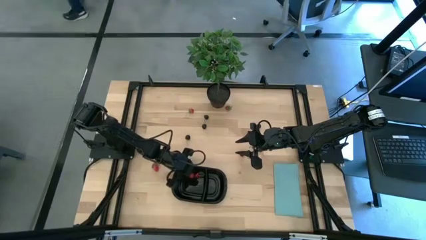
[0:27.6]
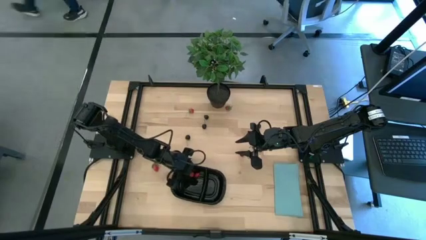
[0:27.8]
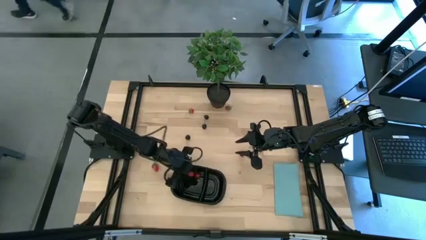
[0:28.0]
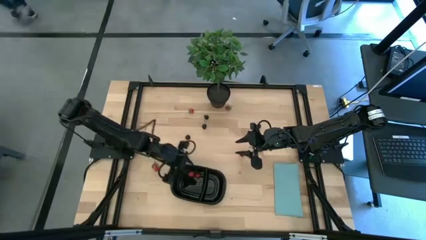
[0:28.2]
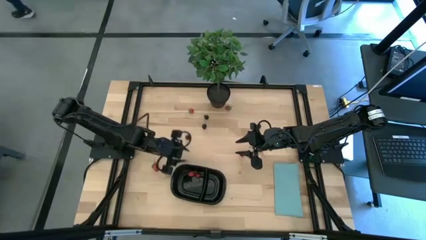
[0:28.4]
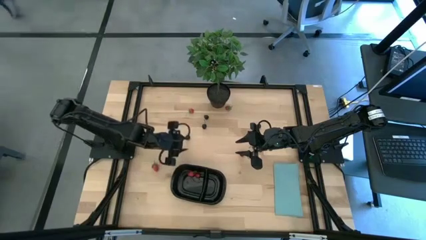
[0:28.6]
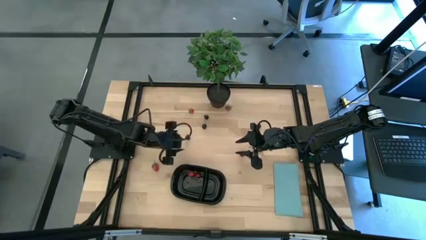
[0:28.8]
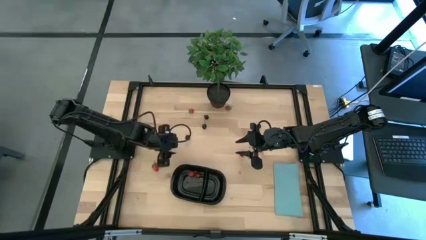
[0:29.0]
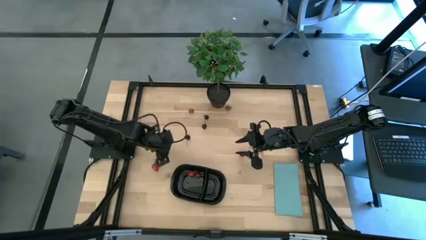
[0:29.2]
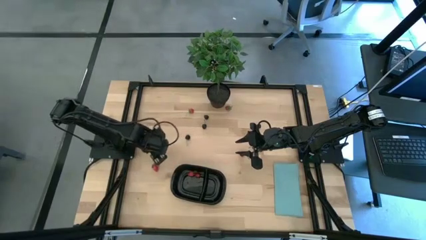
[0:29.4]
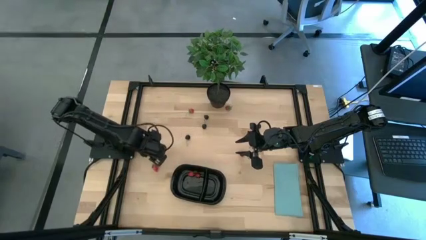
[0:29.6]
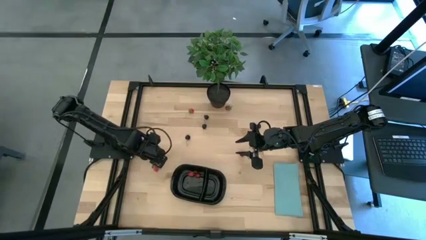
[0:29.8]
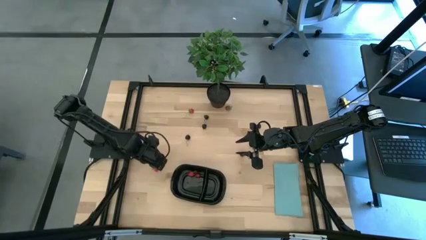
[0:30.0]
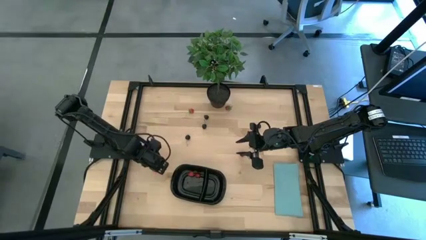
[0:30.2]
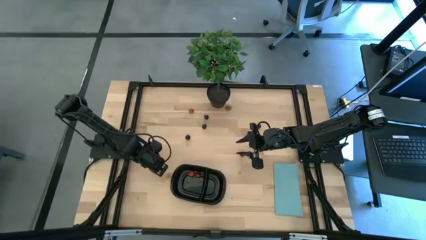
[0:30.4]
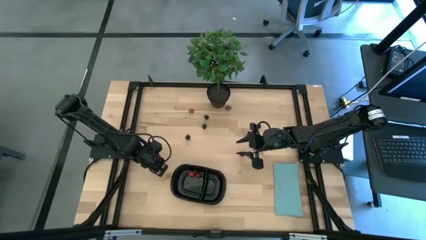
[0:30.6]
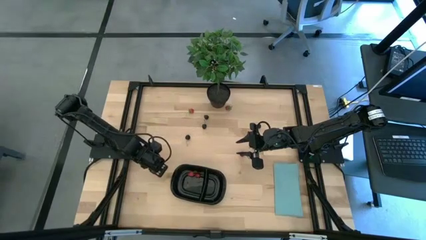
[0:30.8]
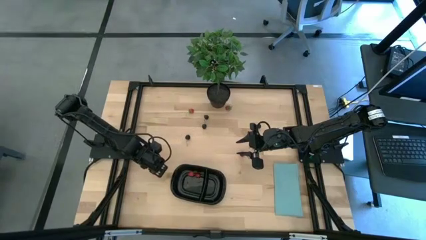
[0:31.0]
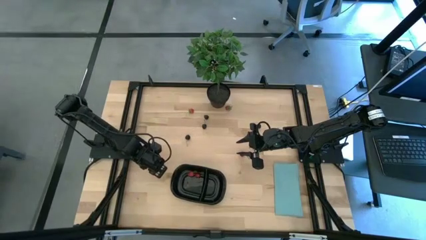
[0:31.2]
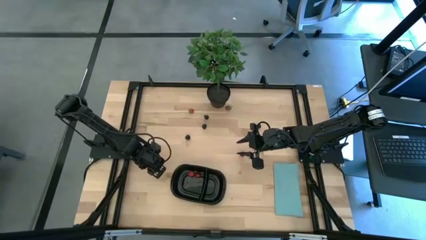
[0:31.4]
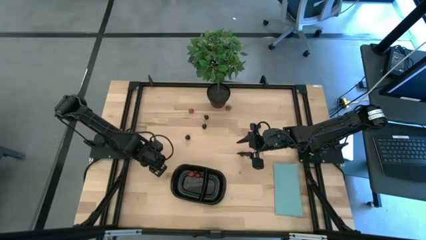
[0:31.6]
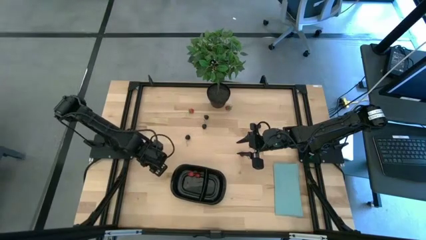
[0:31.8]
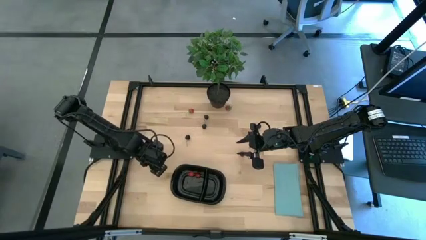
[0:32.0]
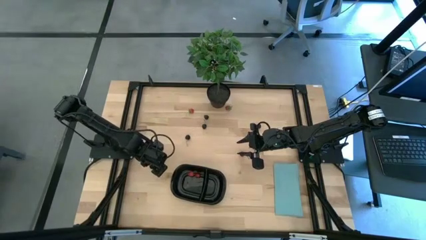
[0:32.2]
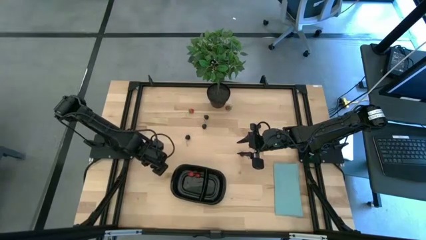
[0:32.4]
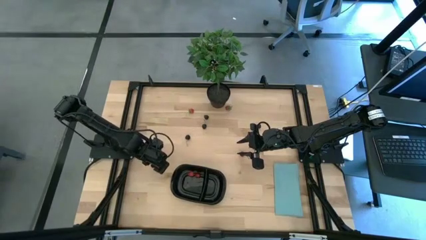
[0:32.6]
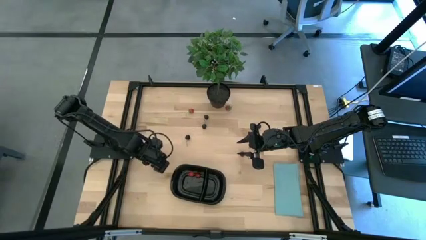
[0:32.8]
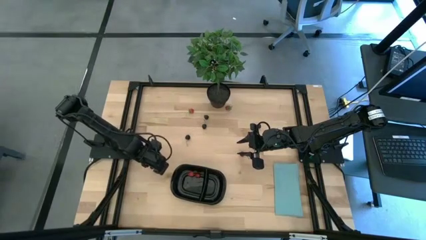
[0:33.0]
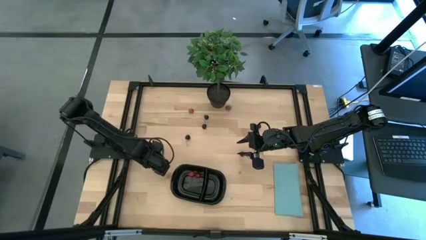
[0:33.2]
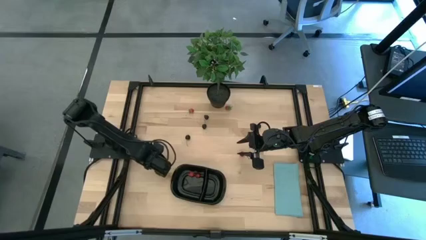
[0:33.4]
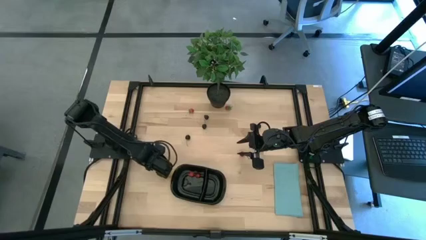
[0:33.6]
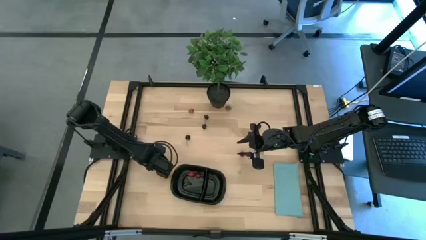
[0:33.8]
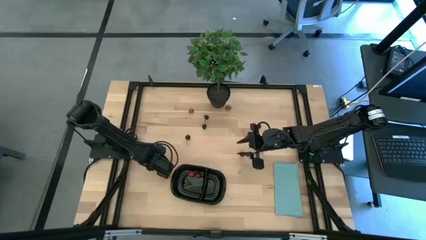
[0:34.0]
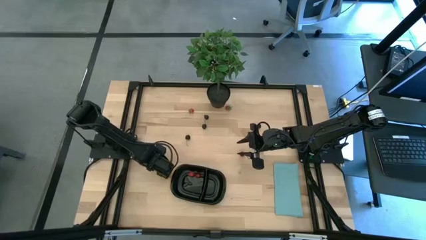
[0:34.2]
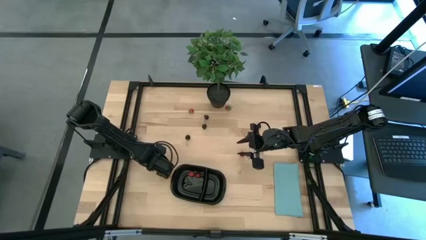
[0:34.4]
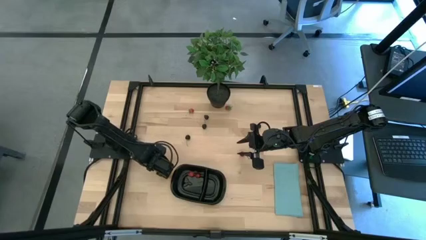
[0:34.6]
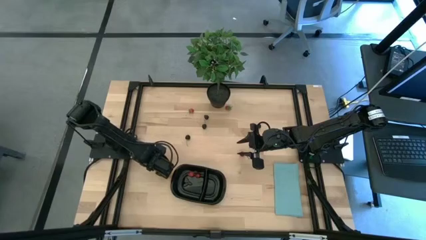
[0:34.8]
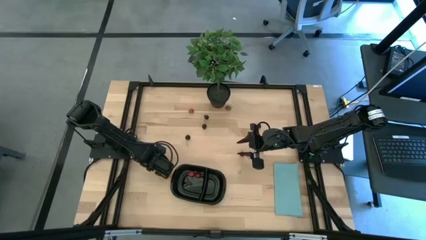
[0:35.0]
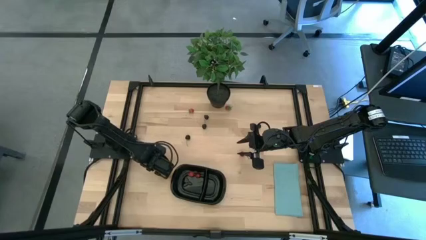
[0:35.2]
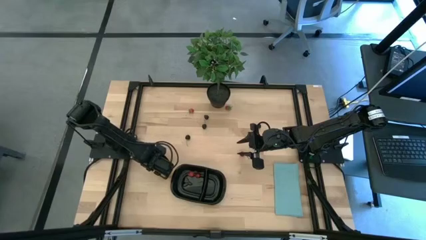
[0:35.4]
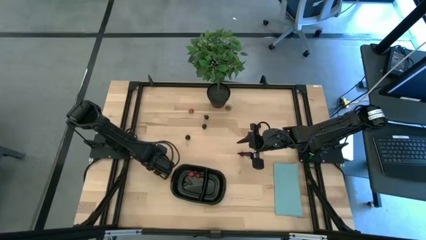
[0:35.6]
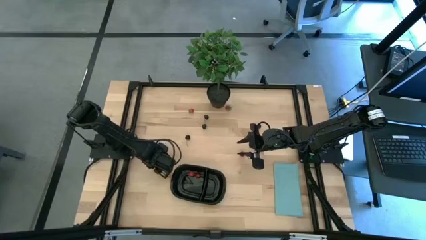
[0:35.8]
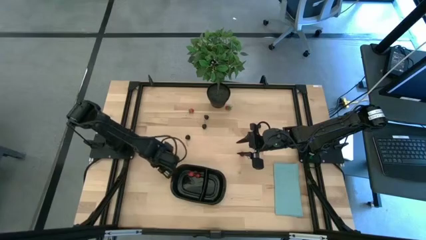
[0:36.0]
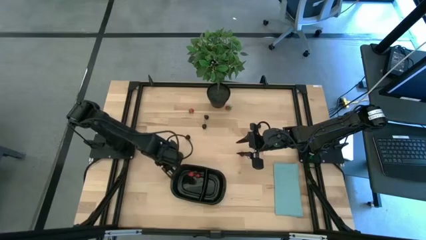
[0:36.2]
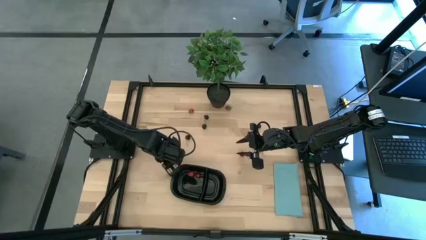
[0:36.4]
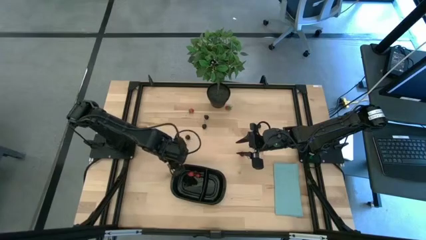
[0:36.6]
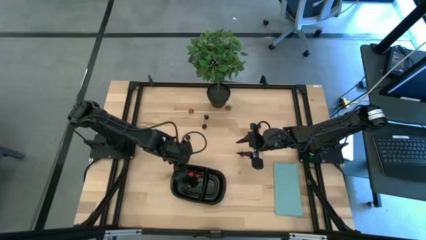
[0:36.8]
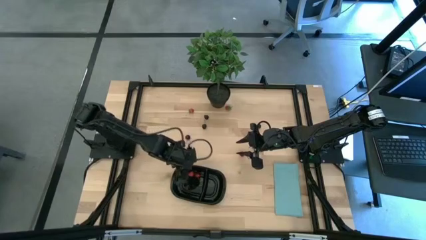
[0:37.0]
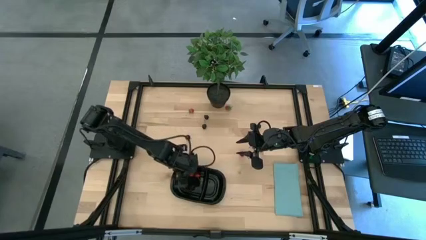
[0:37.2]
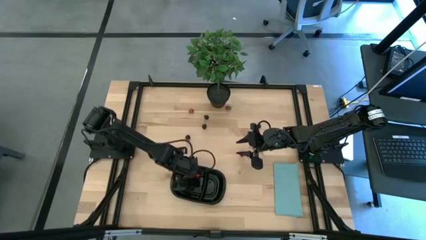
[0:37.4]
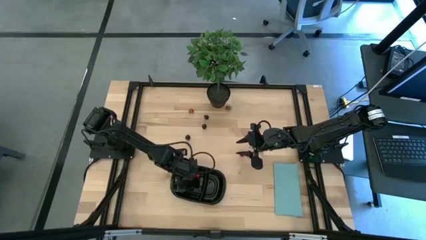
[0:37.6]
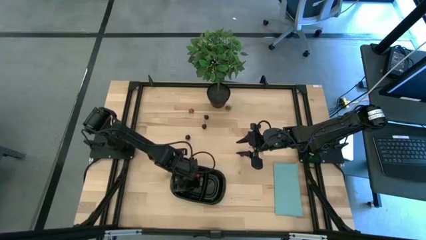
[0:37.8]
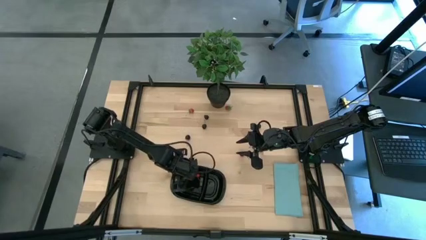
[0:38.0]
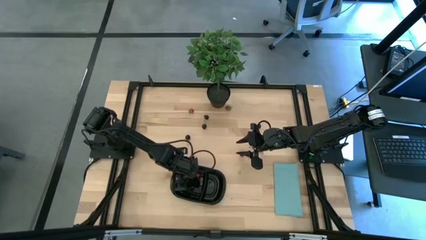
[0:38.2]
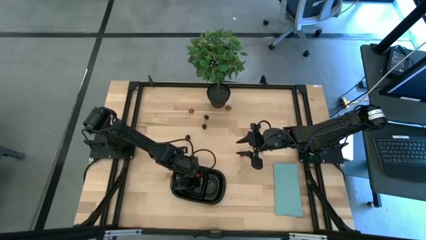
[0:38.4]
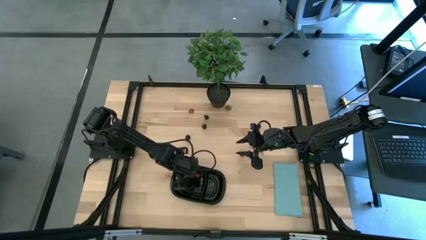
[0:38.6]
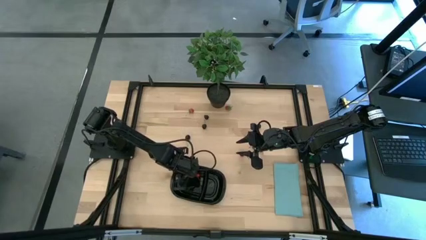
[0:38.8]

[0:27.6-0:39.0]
Task: Pick and placing Produce into tupperware
Put the bottom strawberry into the black container with the other red fruits

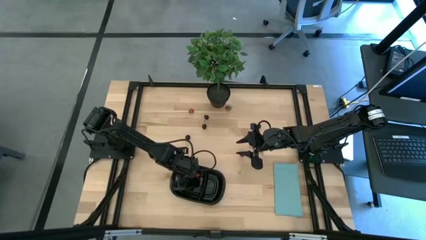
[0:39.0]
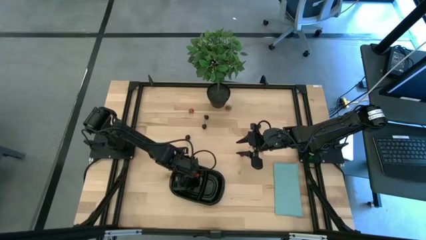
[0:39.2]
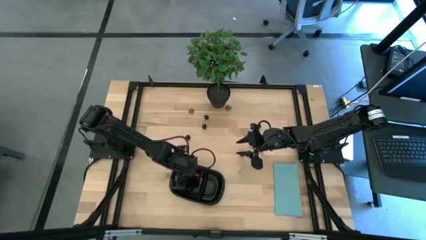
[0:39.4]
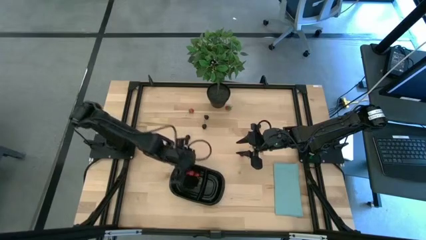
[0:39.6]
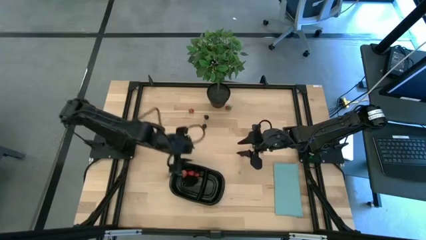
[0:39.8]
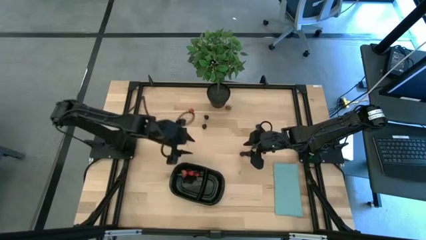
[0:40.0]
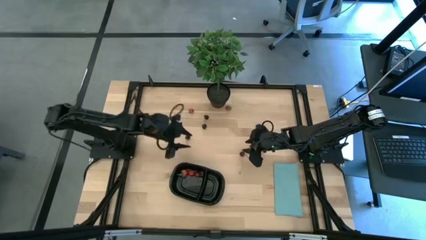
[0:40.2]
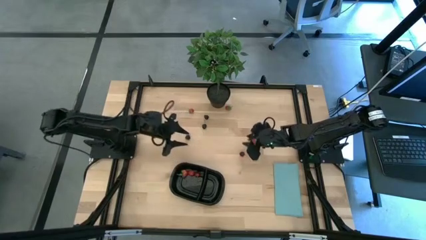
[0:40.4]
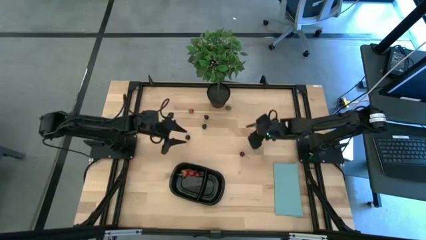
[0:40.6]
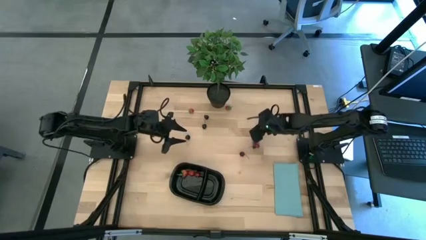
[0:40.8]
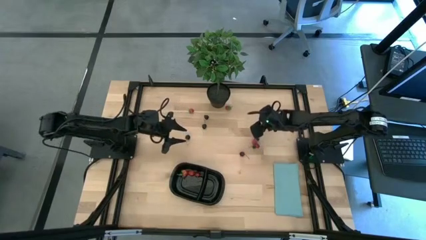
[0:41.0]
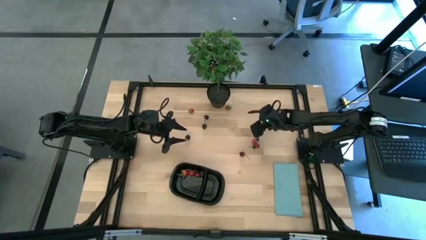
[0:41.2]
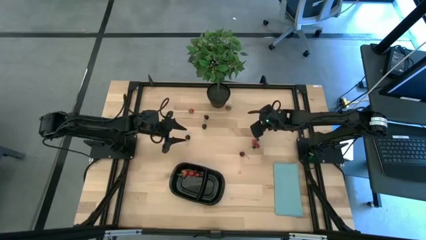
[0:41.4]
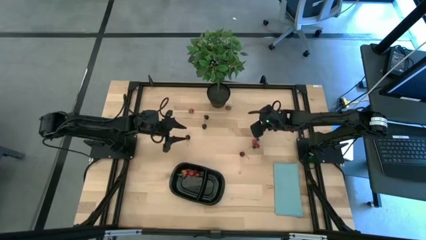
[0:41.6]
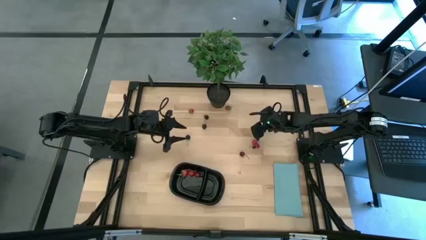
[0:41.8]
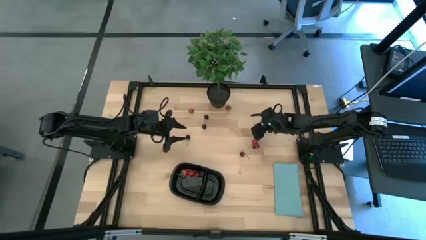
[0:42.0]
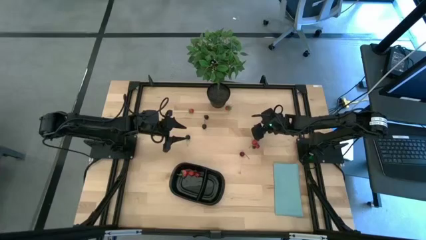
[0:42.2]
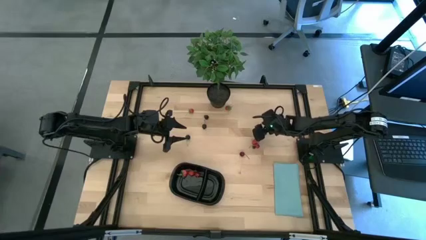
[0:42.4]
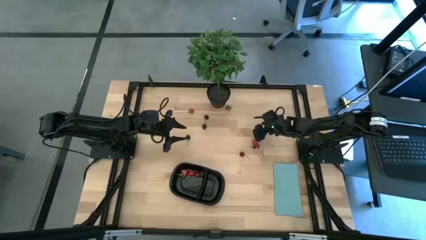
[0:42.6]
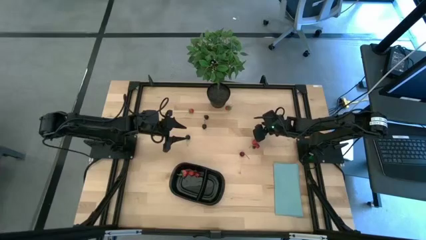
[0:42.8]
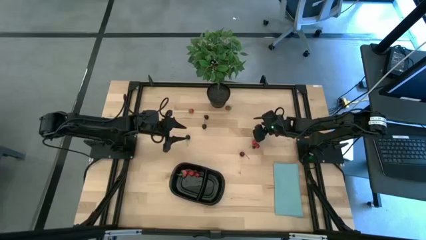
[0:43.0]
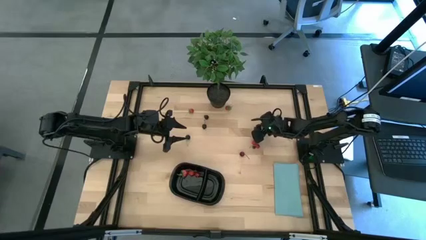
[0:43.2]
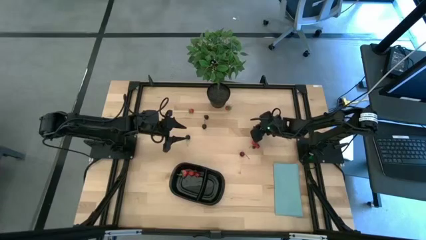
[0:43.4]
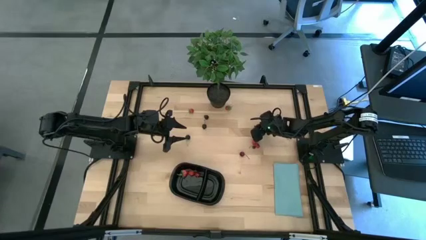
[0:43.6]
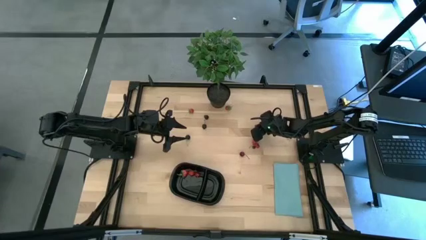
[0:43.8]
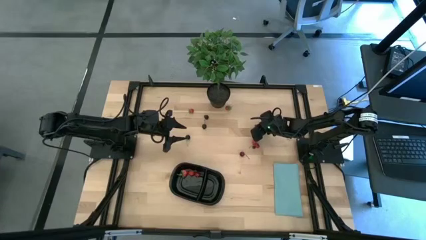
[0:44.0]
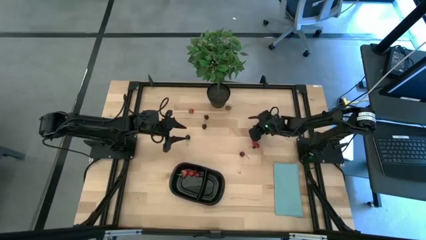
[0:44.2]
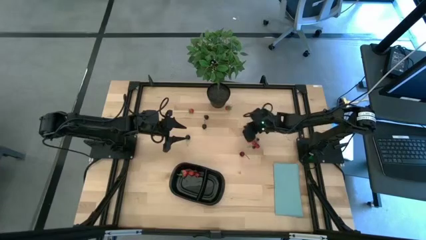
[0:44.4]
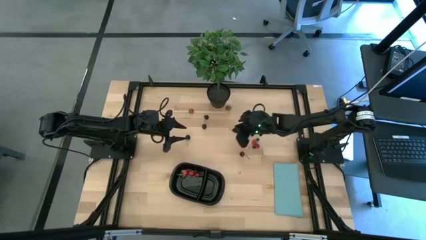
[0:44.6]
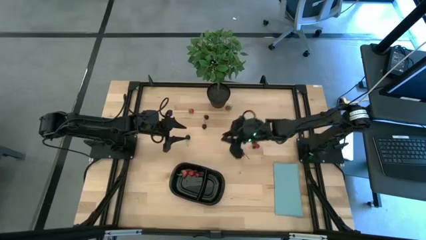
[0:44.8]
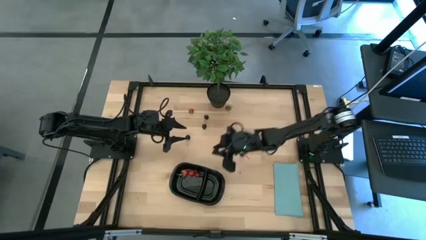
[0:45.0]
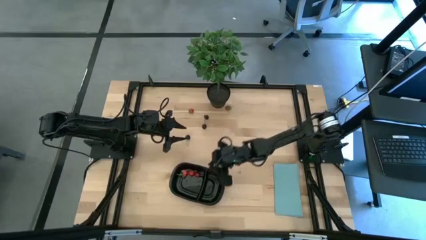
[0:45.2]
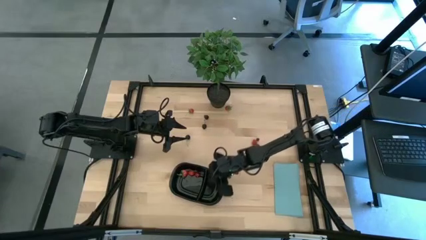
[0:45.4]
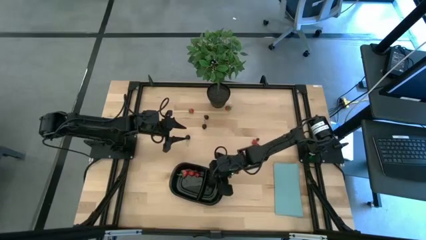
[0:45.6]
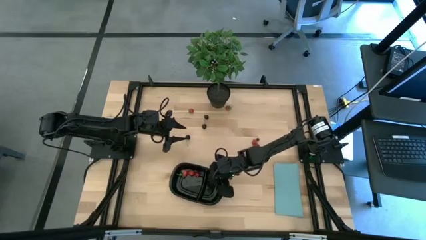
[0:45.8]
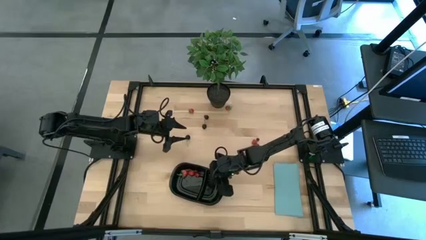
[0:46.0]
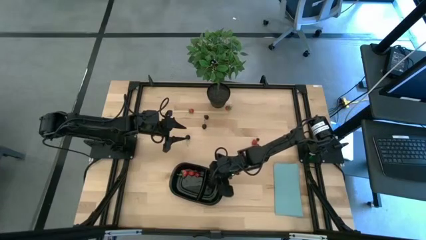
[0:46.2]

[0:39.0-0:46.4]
Put the right blackberry into the right side of the black container
